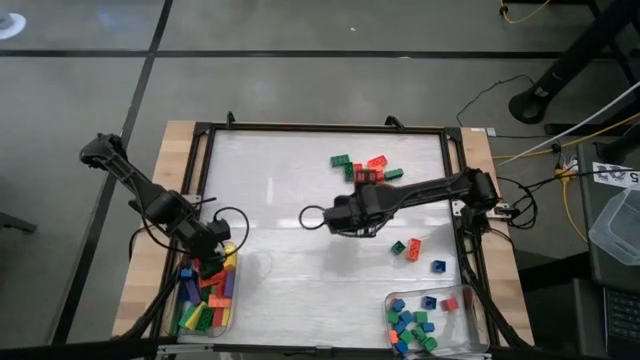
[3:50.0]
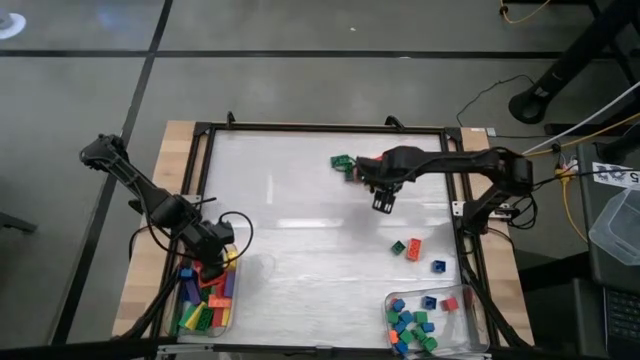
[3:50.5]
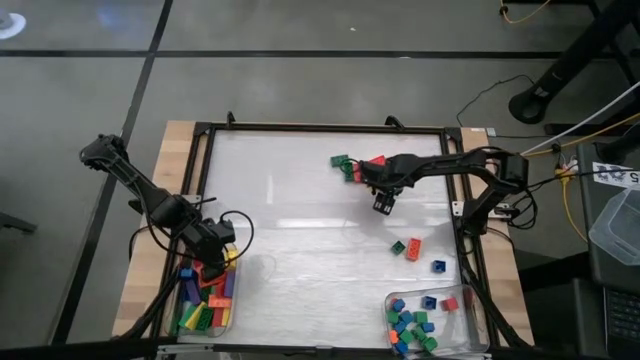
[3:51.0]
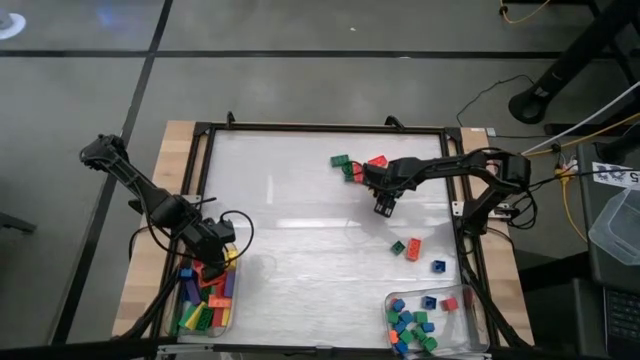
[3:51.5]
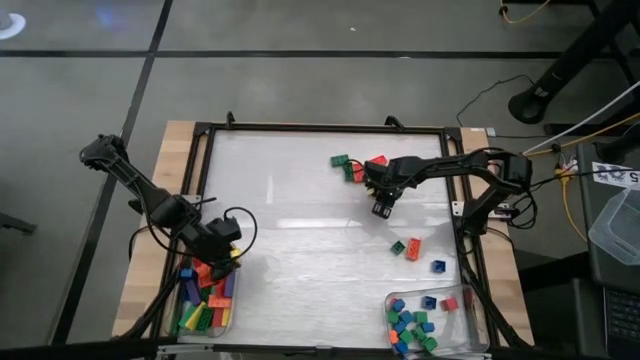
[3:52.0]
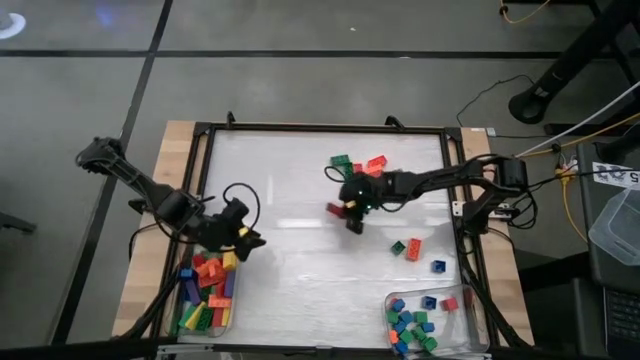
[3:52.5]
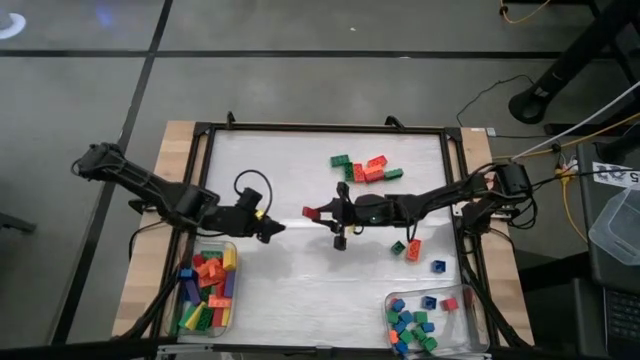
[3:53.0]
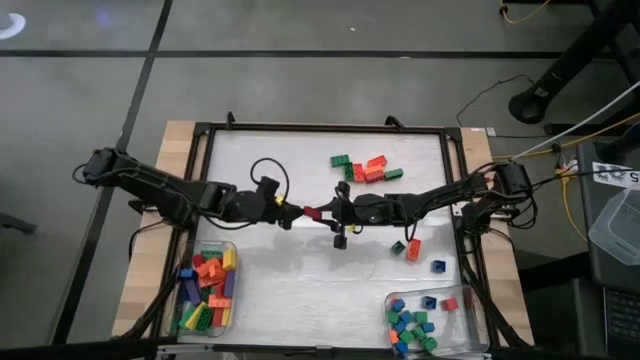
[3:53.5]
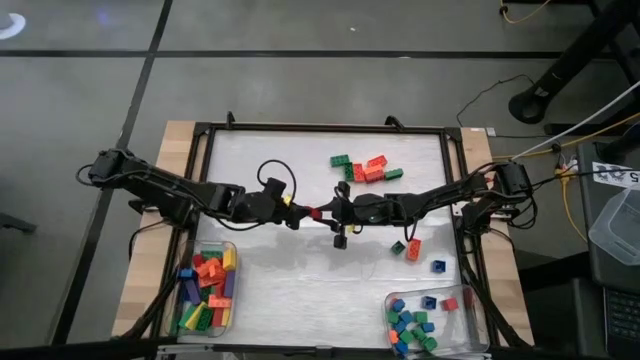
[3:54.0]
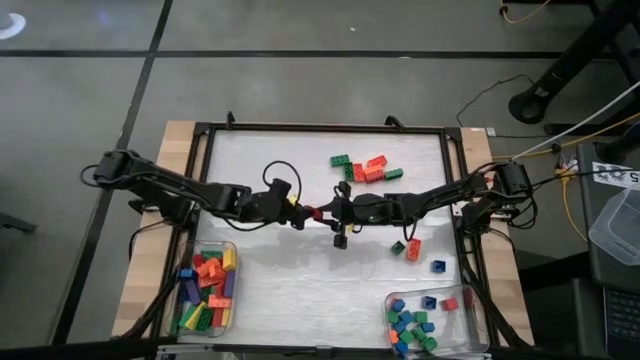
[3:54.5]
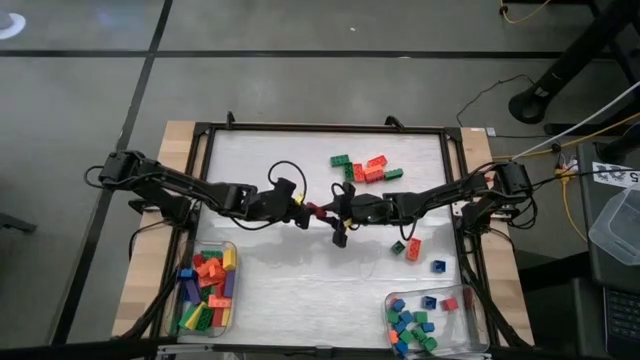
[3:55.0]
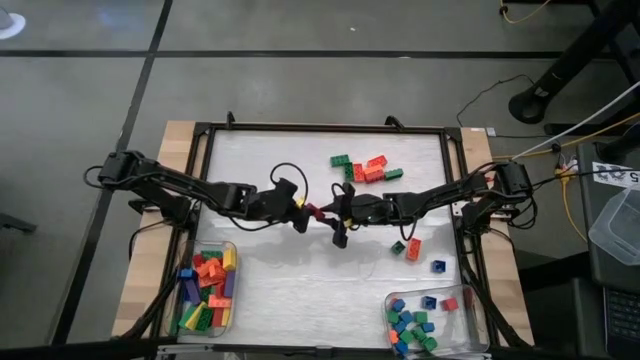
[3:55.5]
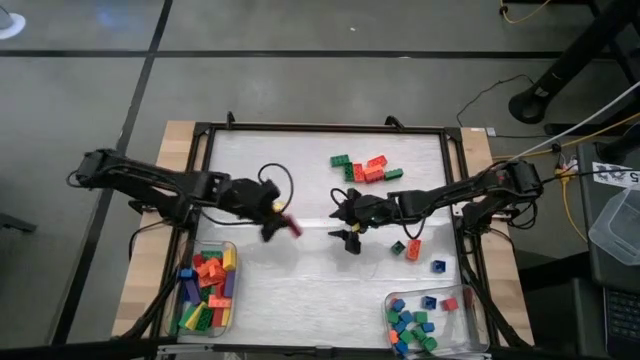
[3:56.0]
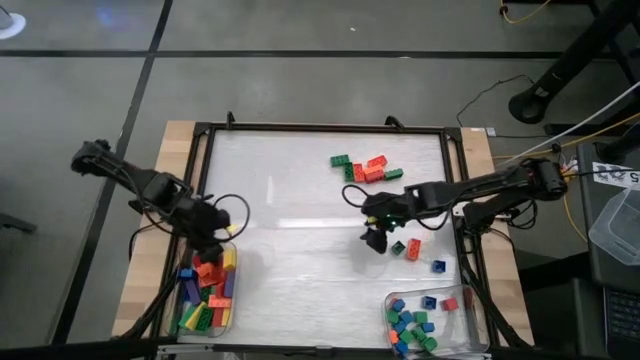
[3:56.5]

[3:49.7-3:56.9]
Task: Sort blocks by size
Put the large red block into the left transparent bin

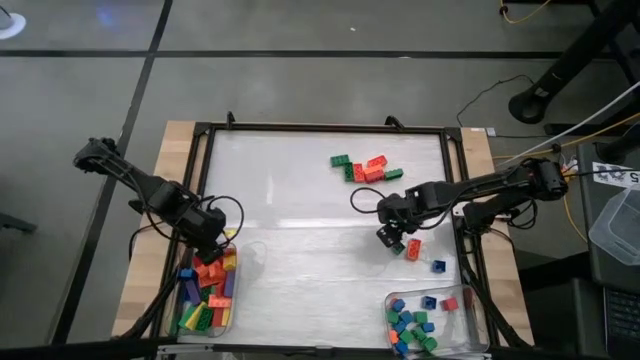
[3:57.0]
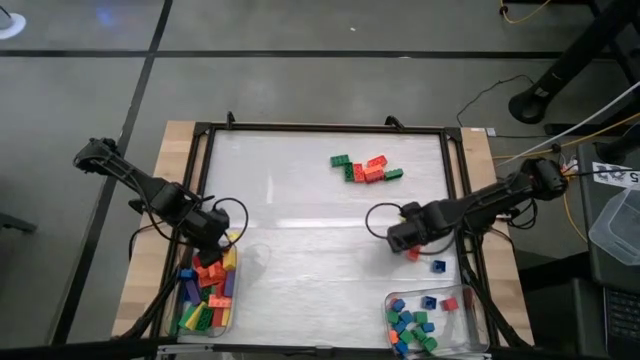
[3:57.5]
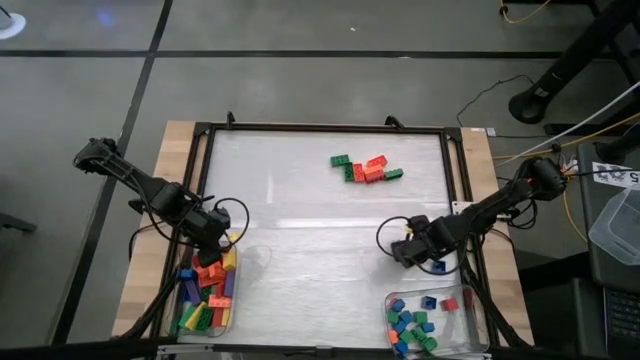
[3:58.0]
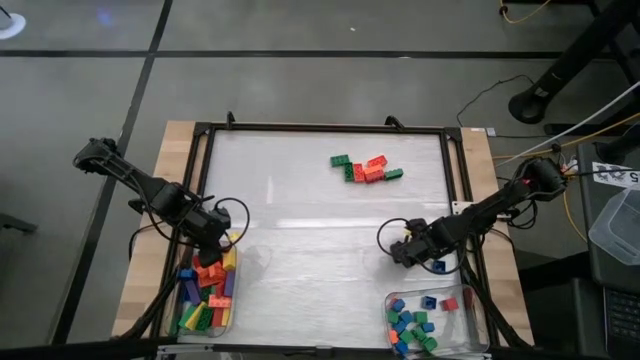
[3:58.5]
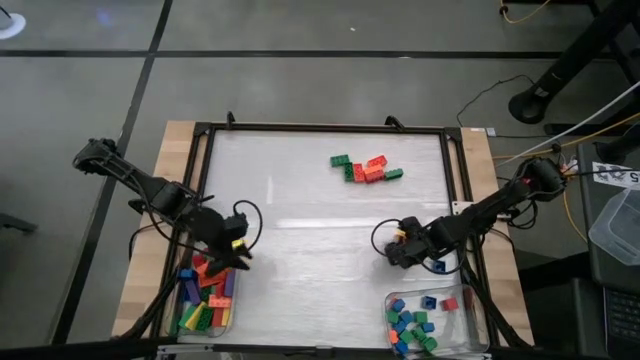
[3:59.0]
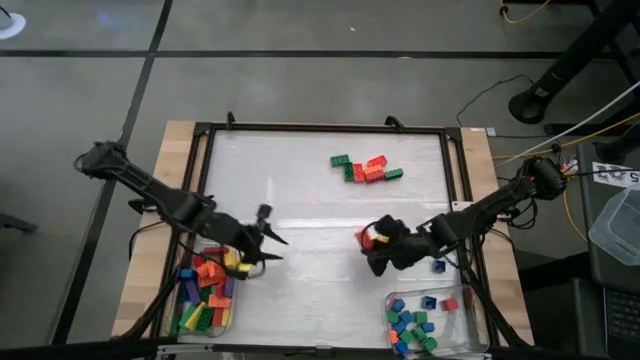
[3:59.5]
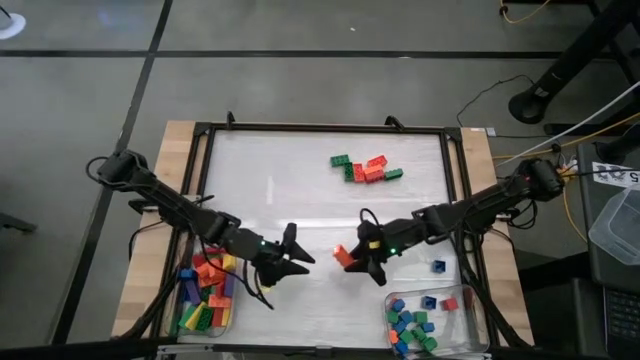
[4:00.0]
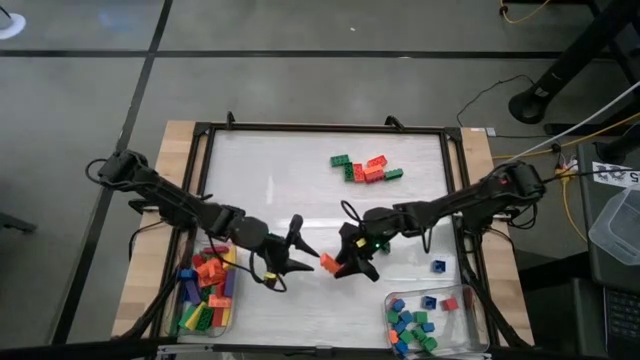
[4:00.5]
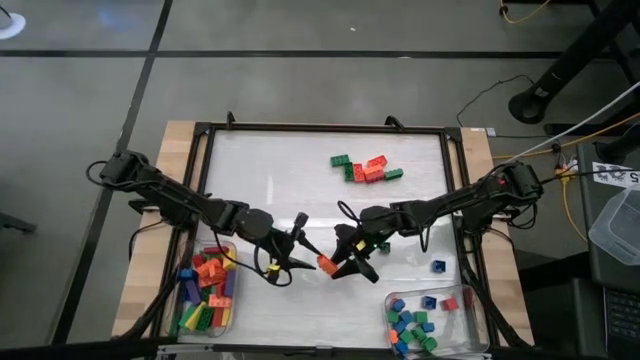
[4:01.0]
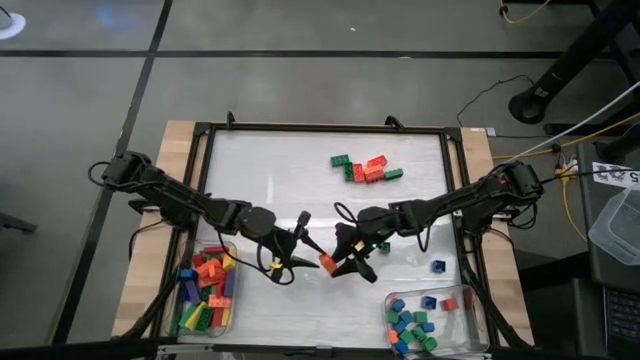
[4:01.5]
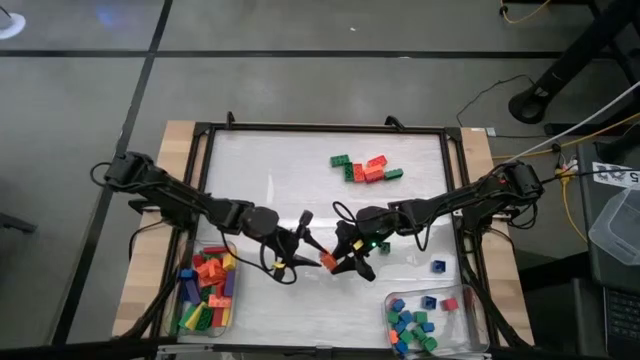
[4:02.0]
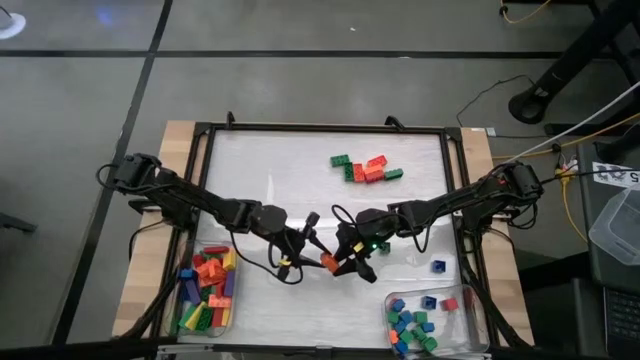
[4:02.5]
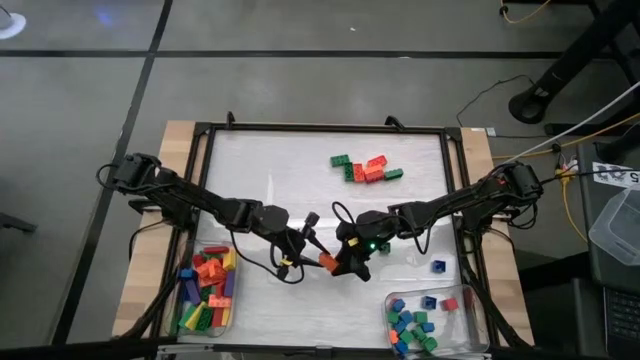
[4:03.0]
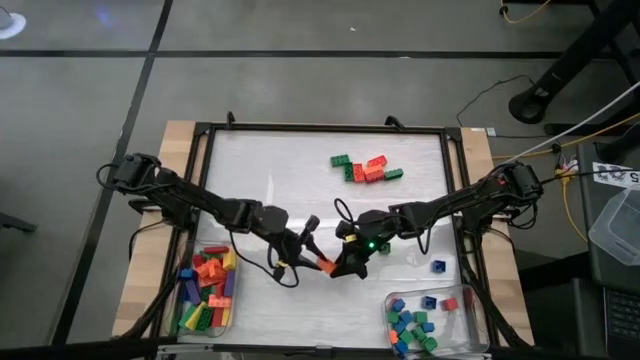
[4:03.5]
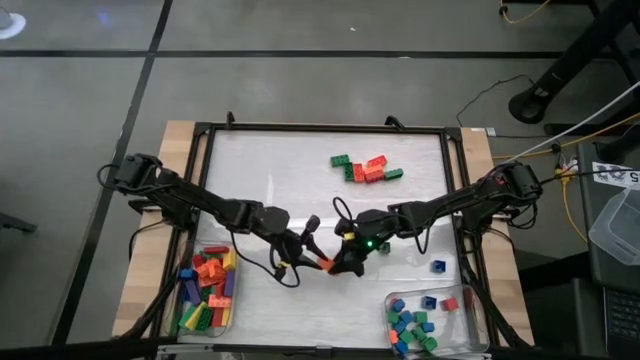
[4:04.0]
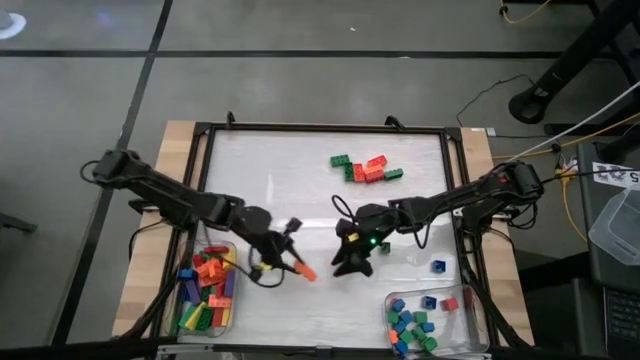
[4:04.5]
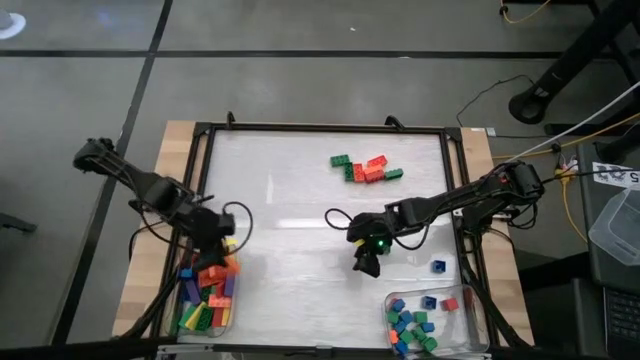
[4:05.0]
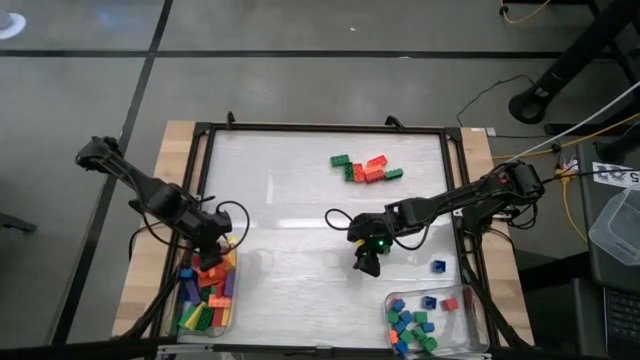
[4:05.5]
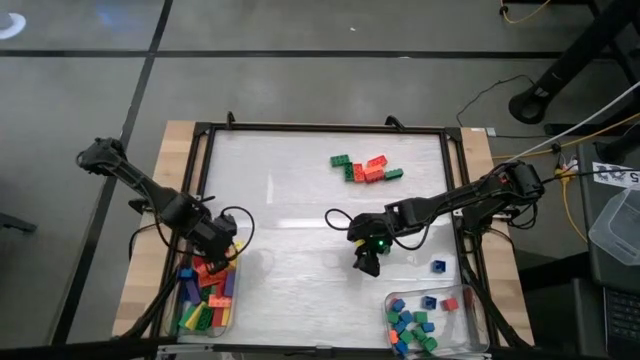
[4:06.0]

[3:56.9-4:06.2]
Put the large orange game piece into the left transparent bin

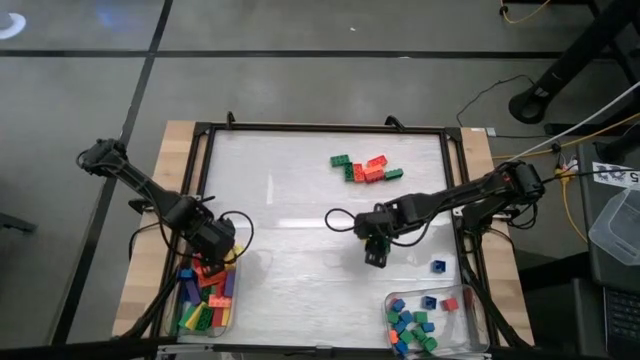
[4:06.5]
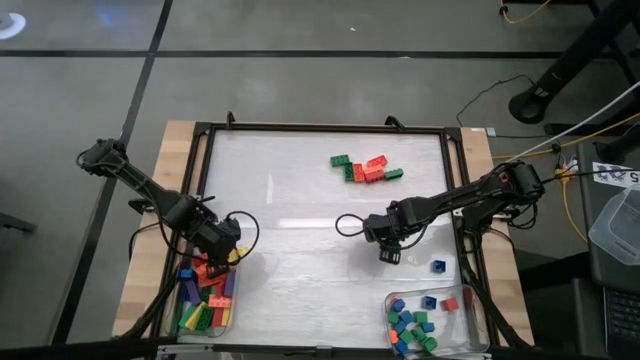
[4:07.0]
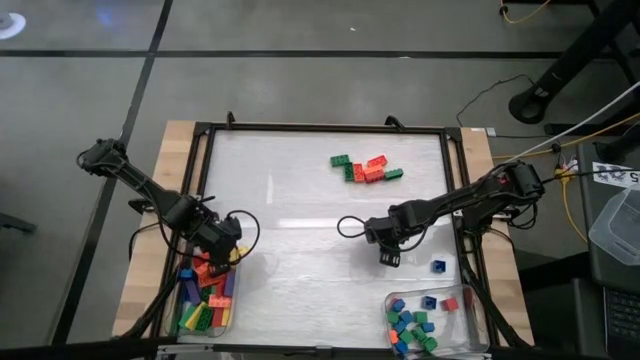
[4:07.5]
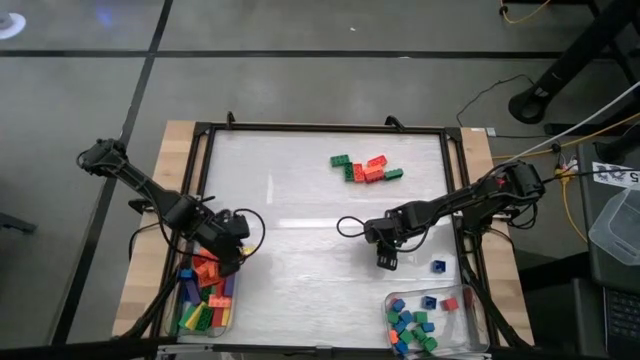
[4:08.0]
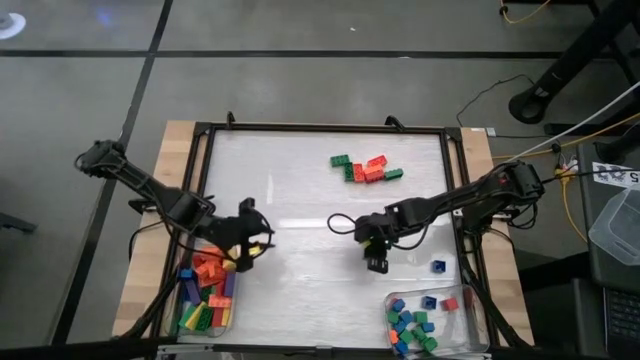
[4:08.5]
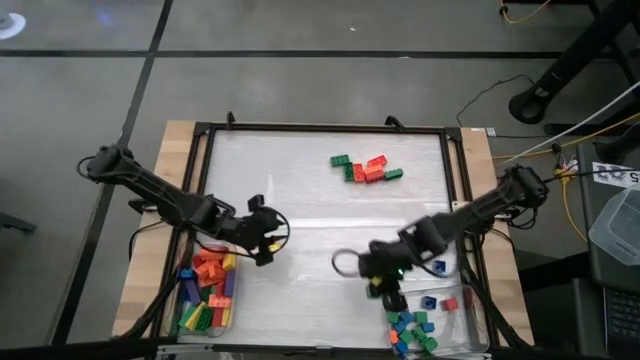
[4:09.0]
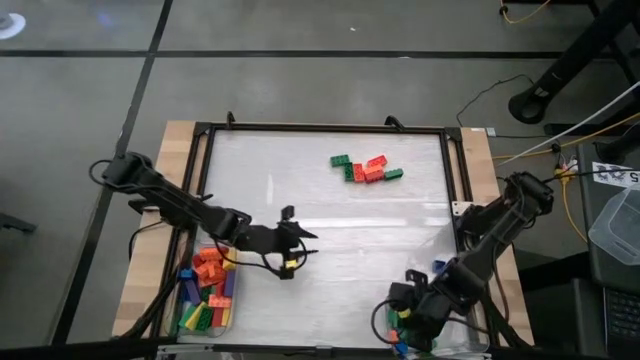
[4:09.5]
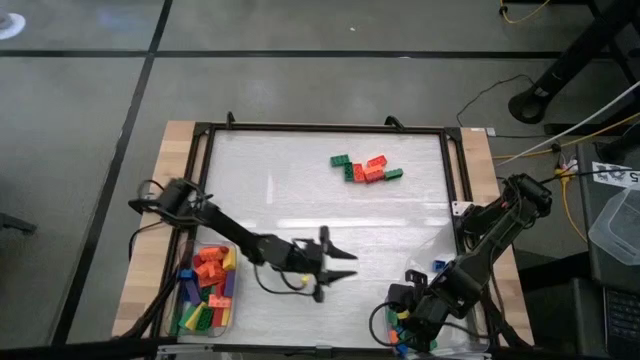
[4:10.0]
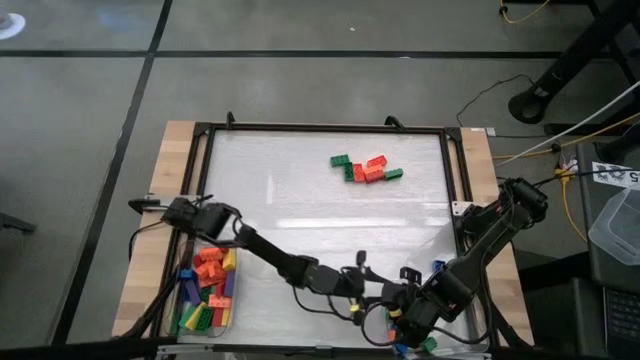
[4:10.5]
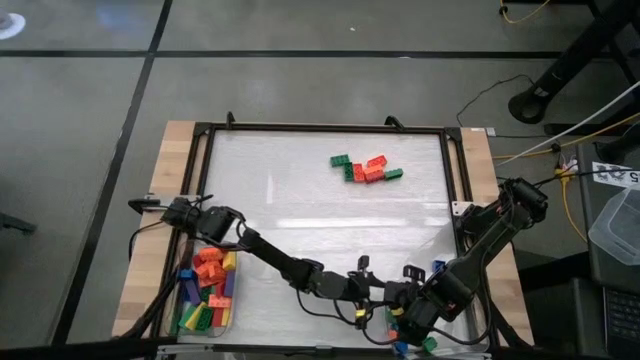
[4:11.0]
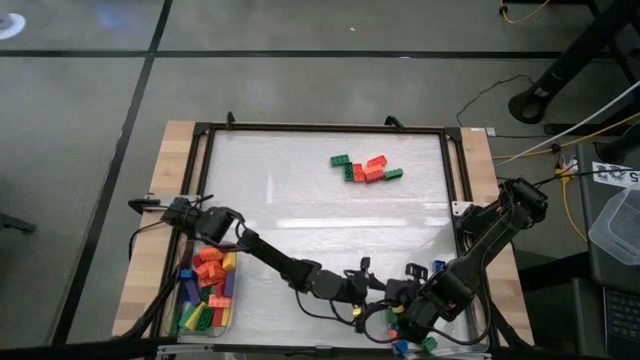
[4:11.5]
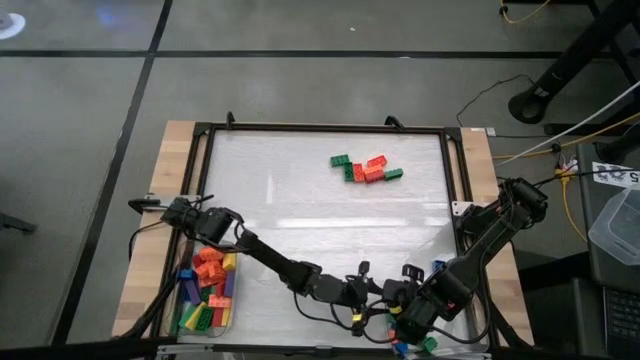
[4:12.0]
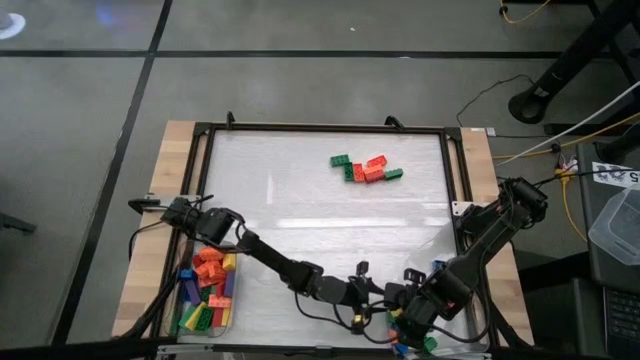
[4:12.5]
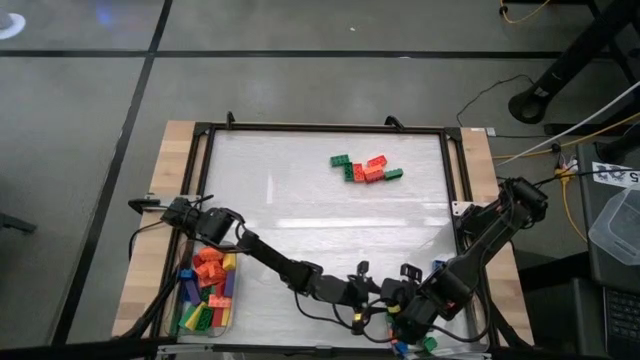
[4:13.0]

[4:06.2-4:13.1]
Put the small green game piece into the right transparent bin
